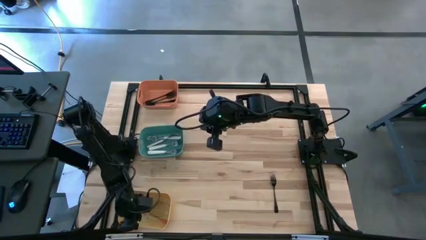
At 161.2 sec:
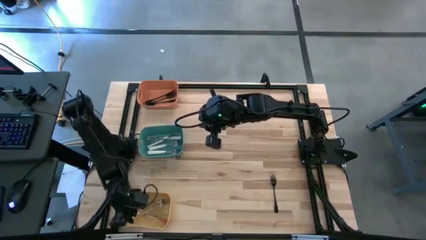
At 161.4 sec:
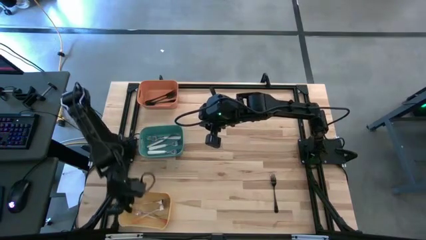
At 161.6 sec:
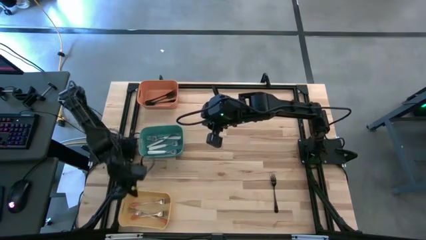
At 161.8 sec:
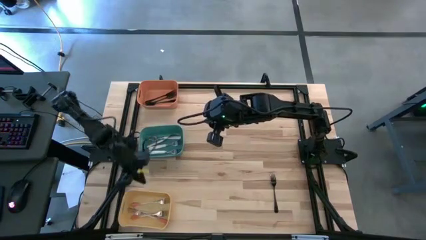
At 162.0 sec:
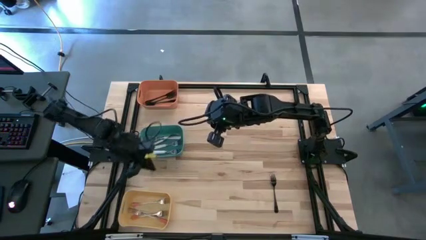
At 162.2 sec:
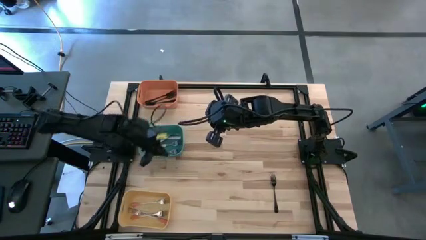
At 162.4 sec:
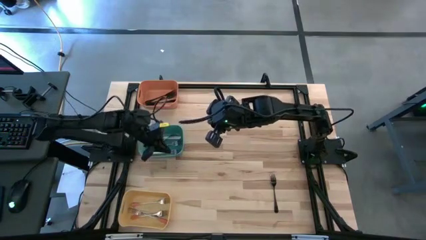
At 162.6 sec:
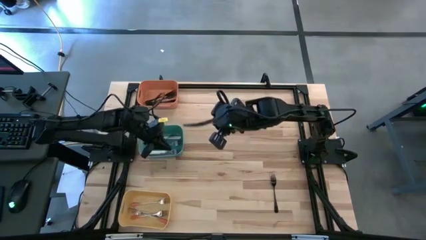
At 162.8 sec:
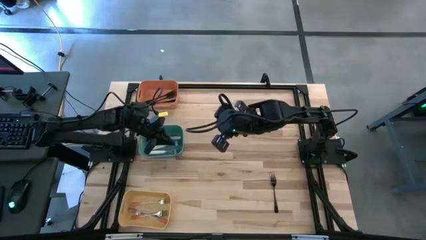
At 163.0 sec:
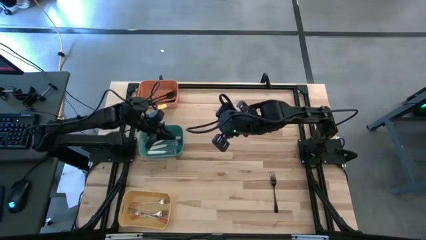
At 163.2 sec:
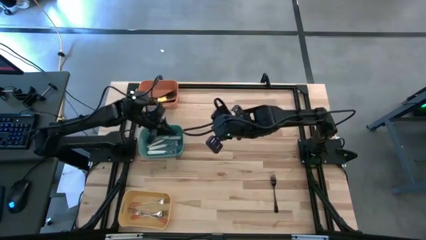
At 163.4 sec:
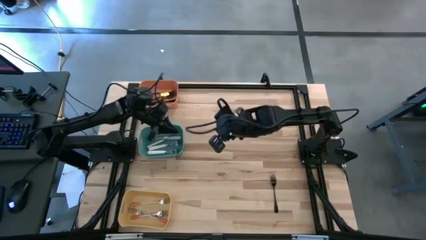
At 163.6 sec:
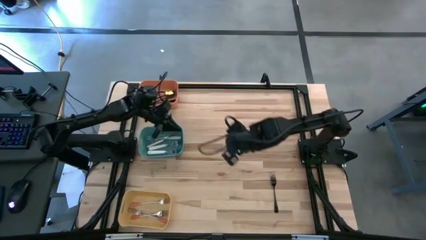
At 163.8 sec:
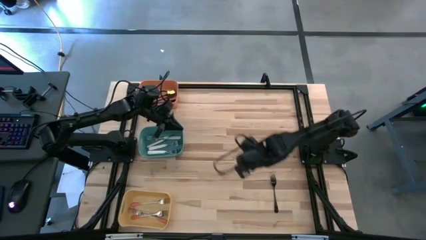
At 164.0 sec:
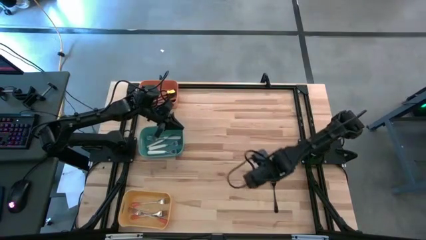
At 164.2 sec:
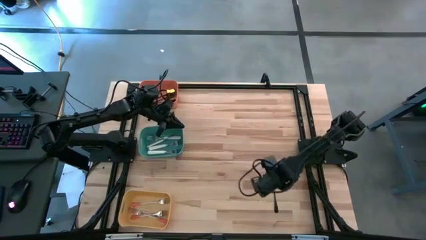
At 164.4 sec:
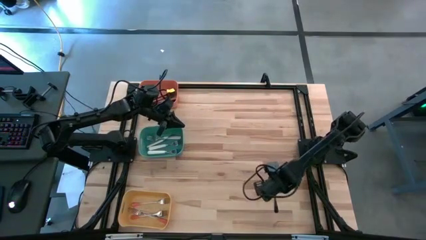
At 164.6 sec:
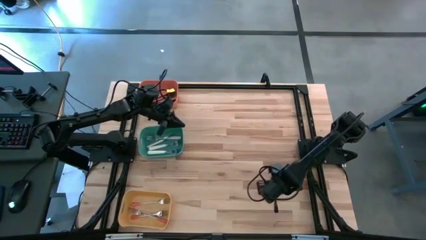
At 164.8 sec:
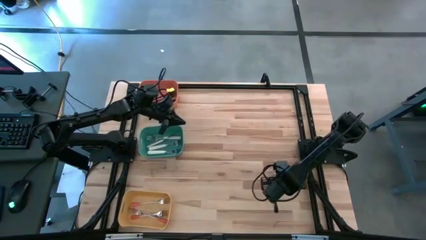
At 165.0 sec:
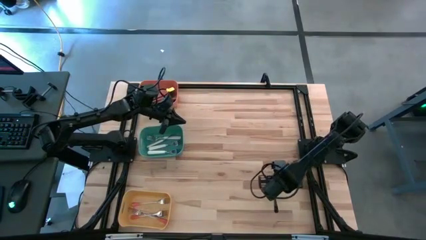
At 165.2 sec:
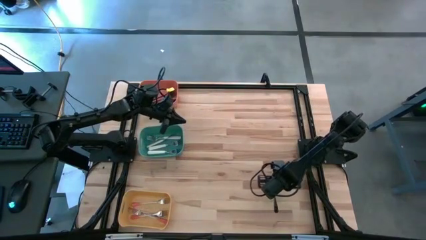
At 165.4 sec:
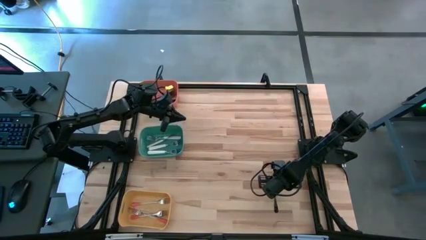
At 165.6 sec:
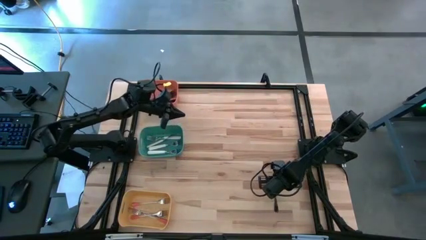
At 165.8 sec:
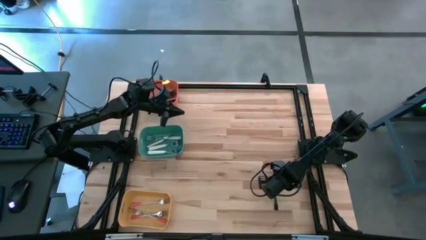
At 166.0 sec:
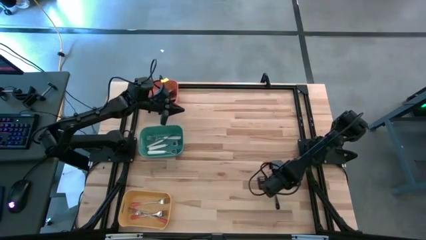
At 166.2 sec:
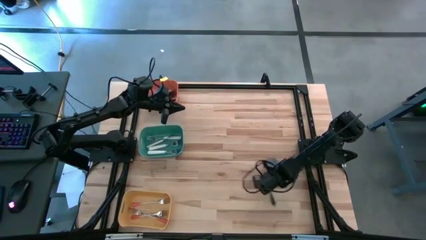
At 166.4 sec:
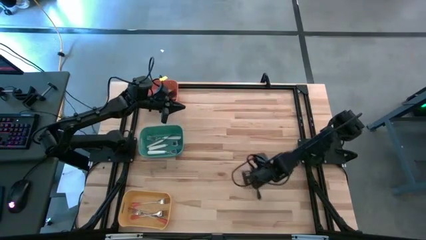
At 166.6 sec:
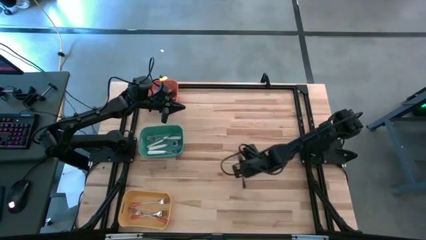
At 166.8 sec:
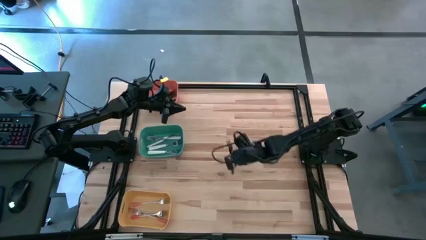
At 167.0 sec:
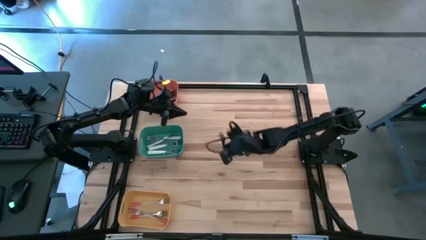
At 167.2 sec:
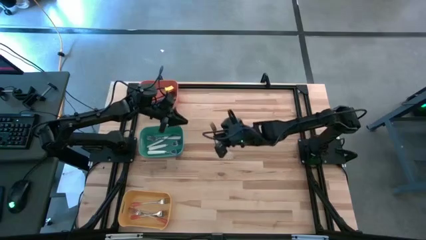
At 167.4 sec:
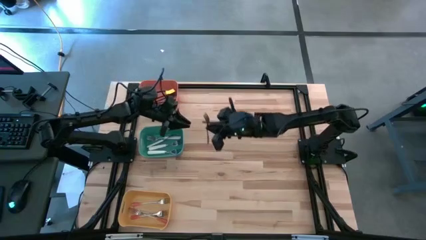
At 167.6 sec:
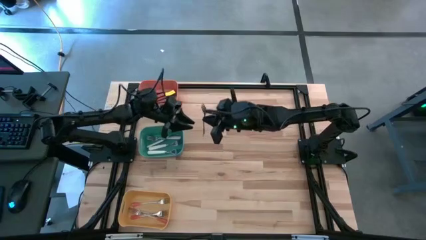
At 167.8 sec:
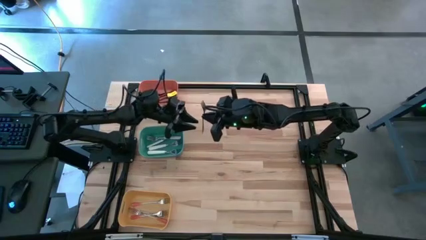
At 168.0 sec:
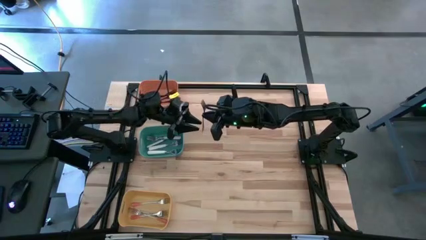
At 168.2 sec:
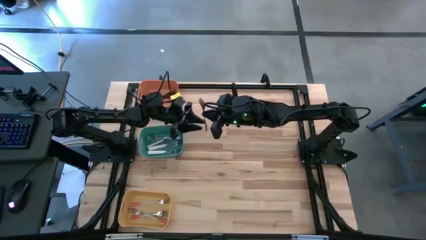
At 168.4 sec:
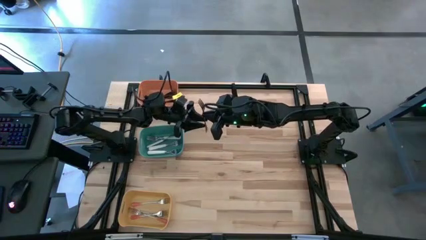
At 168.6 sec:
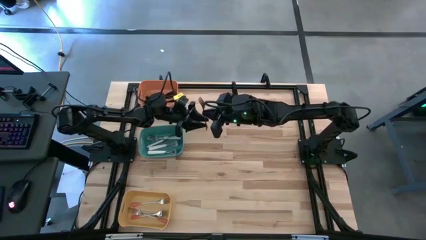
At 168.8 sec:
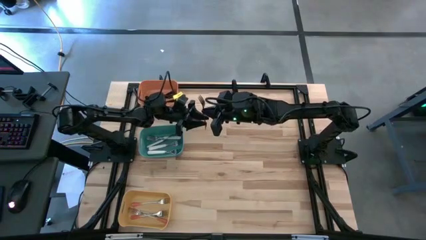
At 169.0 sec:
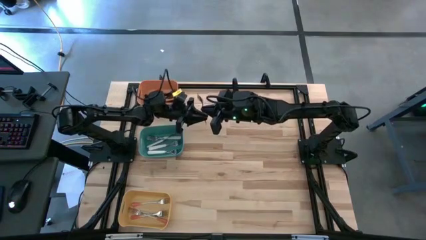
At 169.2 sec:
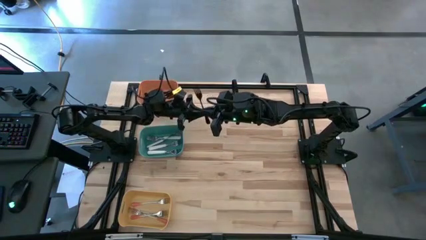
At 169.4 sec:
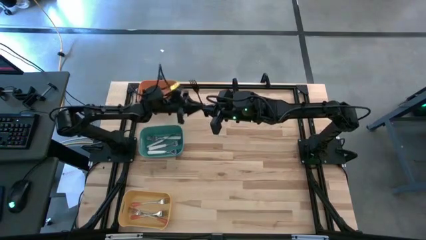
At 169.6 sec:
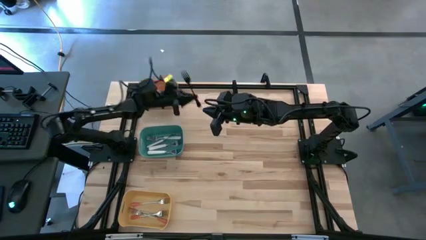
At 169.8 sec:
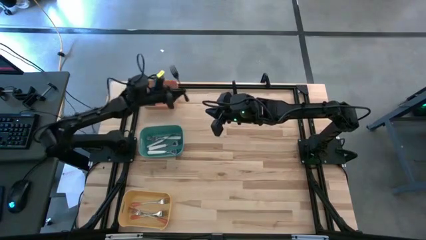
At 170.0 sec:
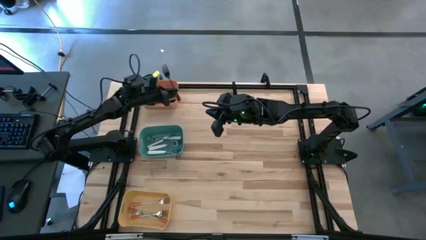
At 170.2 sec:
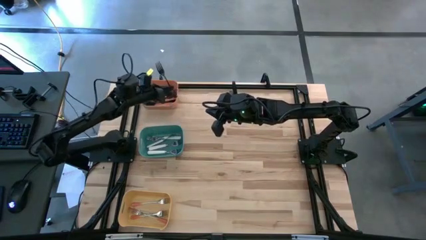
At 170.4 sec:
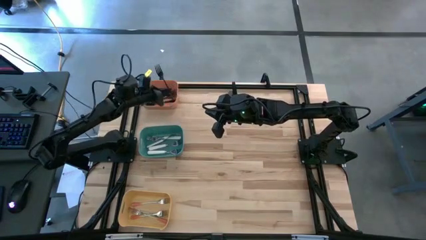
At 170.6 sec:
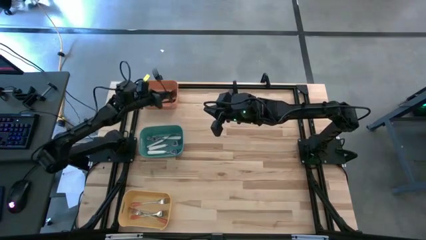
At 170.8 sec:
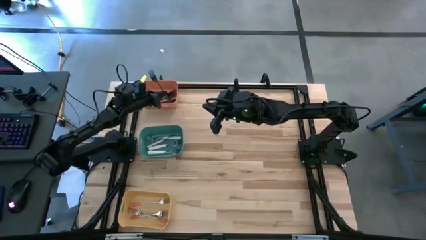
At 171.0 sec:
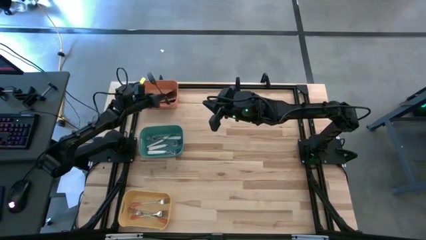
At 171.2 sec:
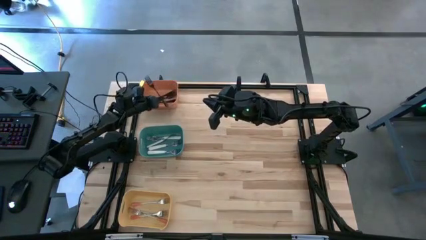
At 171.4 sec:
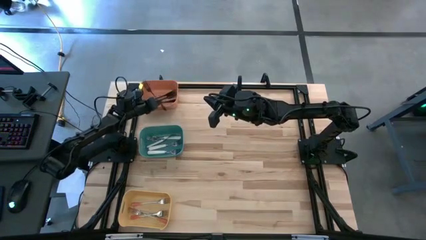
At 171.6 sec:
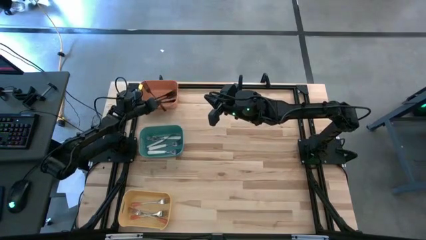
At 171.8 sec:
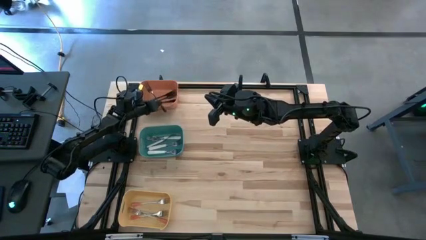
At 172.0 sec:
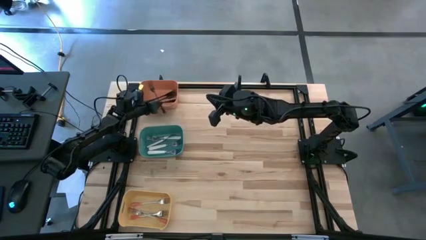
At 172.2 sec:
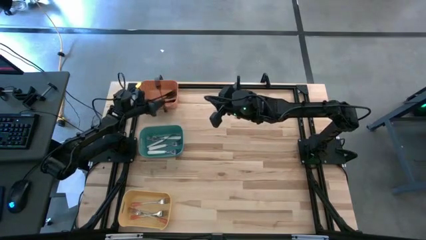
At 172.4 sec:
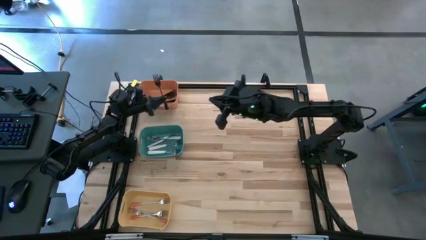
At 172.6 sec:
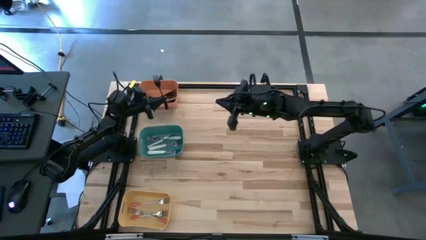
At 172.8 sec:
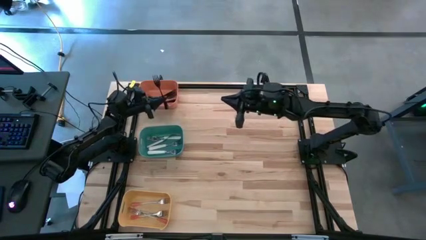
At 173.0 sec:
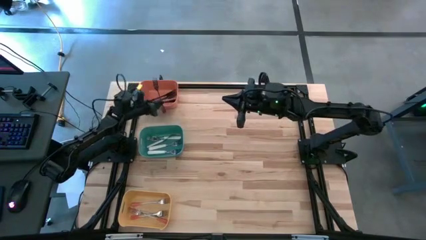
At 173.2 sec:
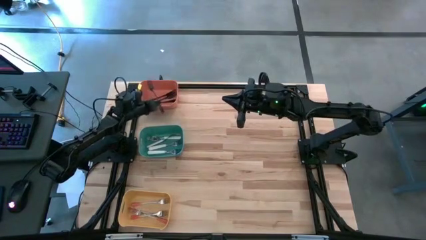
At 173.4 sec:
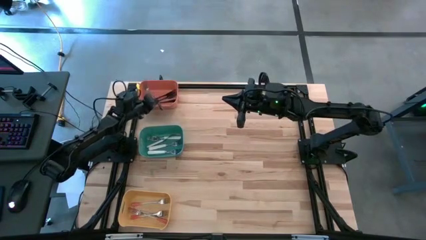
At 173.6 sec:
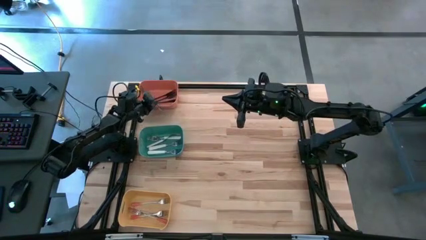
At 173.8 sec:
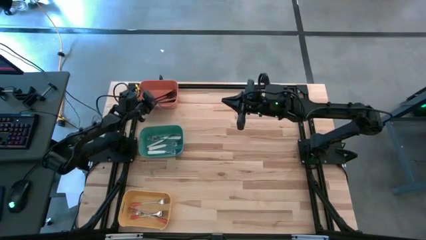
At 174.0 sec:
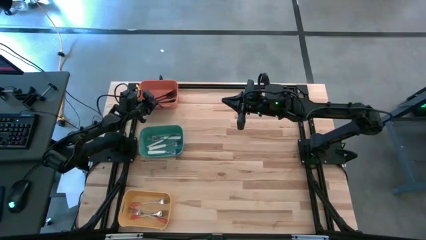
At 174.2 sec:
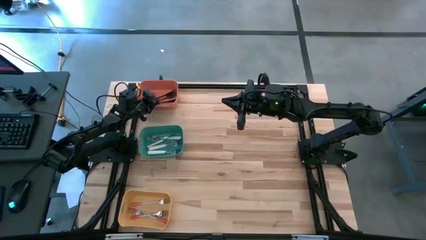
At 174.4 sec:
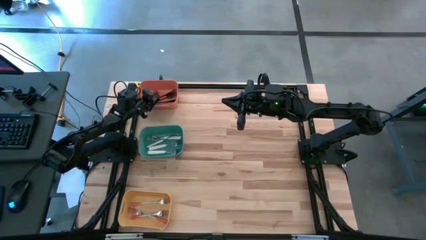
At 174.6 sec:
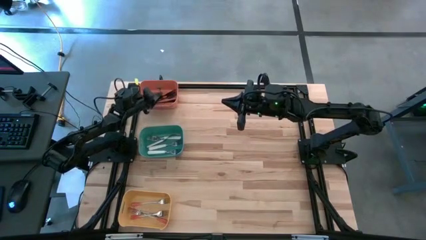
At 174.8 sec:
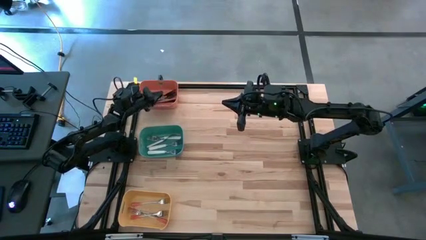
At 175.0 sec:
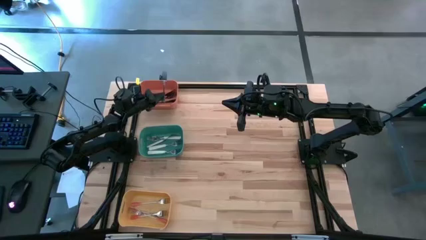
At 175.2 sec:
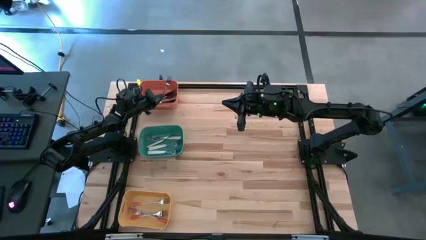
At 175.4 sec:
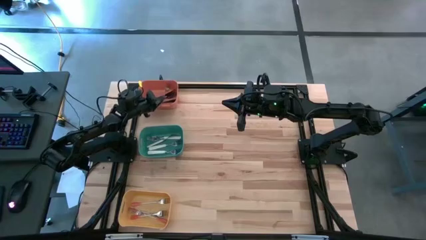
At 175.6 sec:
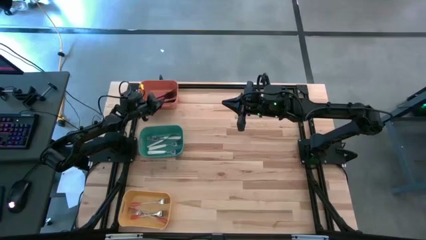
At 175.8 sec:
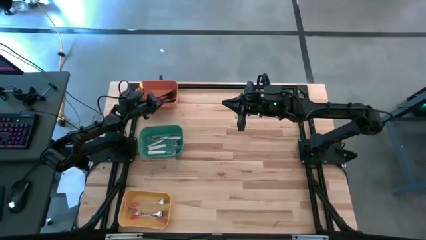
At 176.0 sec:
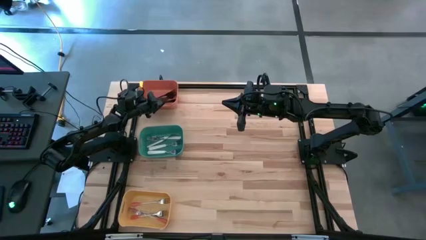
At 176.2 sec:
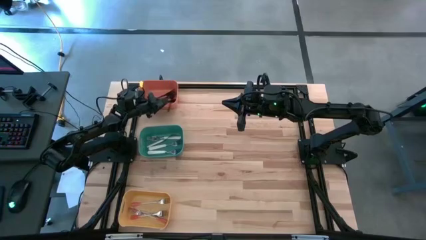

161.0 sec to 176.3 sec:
Task: Sort silverware by color (type)
Put the black fork into the orange bin
